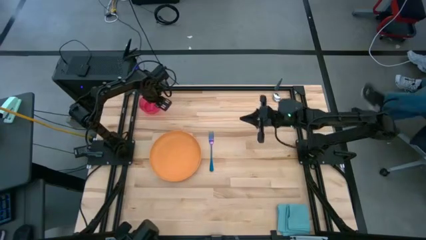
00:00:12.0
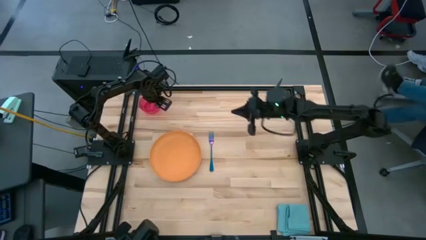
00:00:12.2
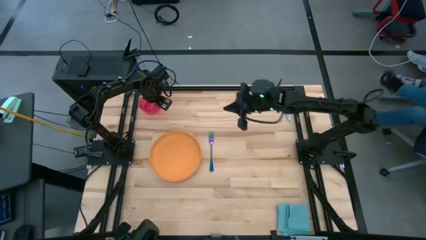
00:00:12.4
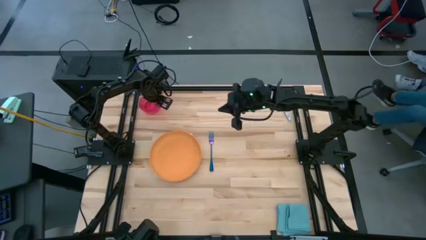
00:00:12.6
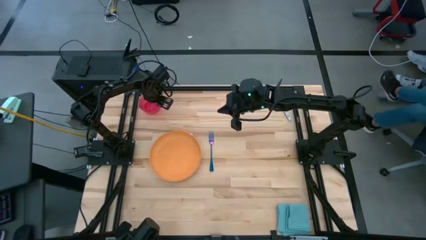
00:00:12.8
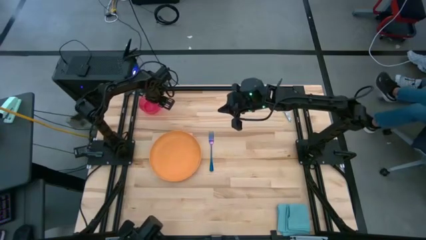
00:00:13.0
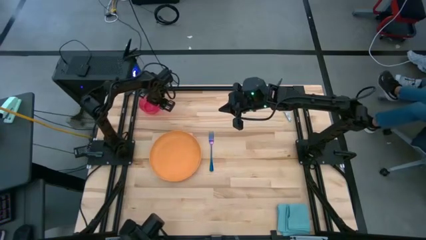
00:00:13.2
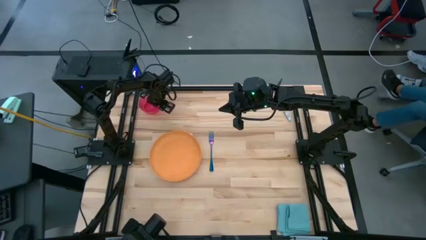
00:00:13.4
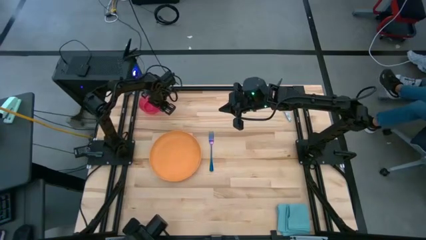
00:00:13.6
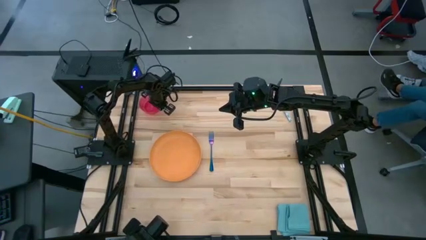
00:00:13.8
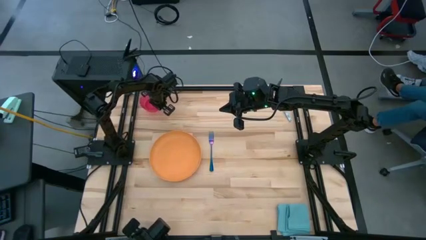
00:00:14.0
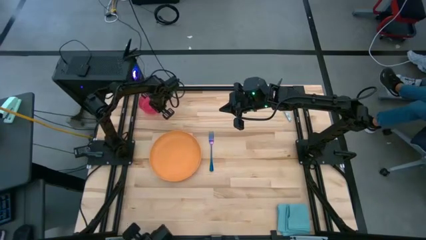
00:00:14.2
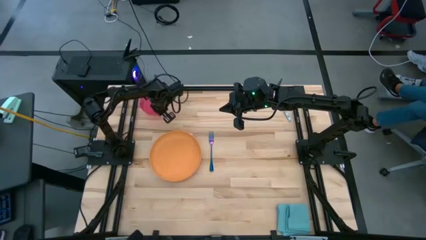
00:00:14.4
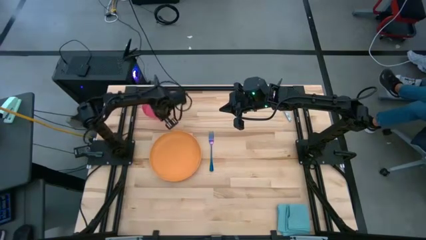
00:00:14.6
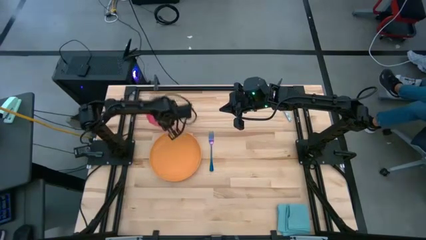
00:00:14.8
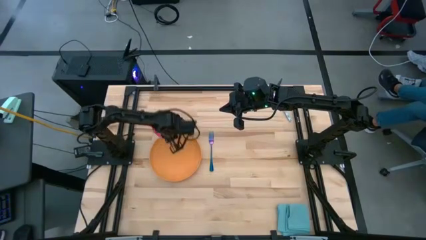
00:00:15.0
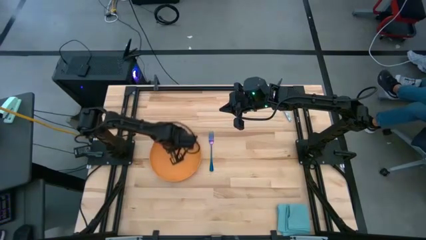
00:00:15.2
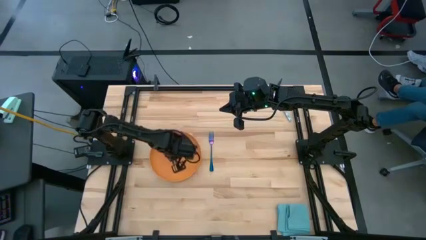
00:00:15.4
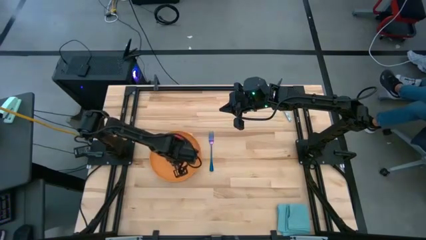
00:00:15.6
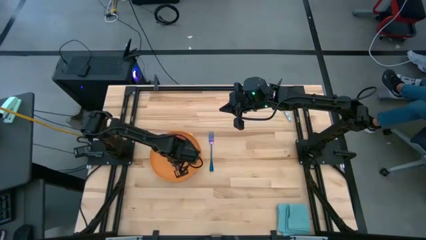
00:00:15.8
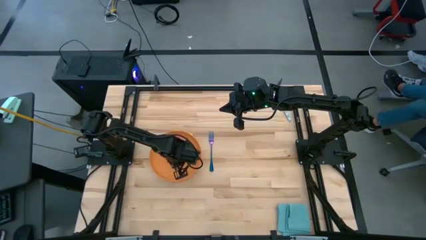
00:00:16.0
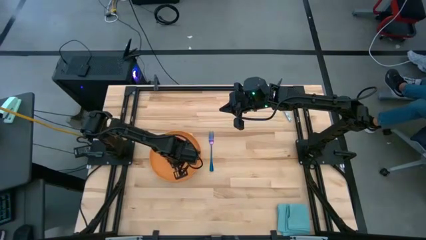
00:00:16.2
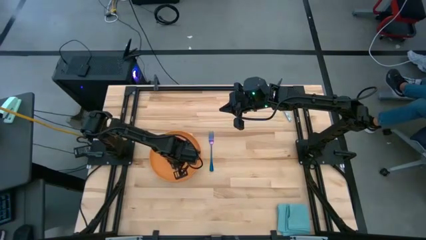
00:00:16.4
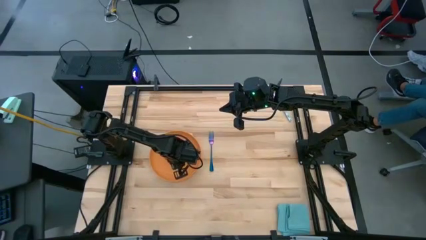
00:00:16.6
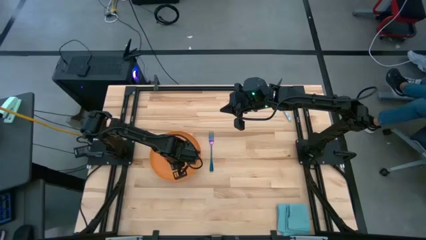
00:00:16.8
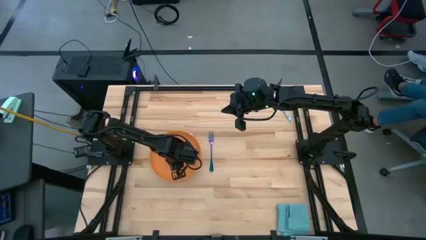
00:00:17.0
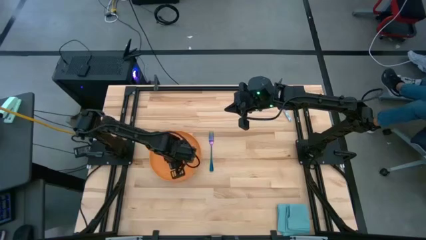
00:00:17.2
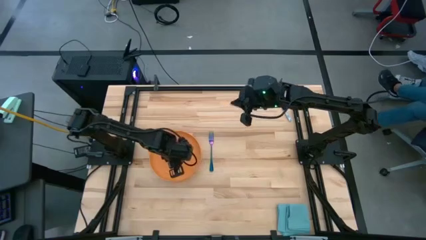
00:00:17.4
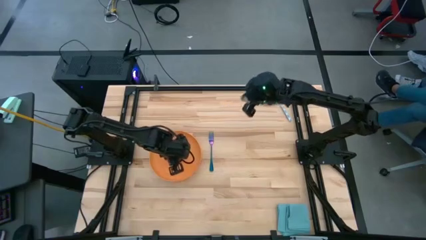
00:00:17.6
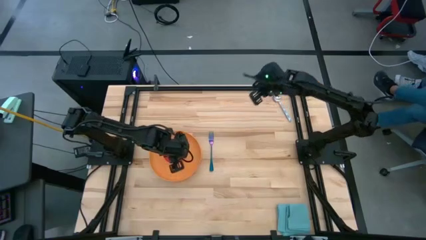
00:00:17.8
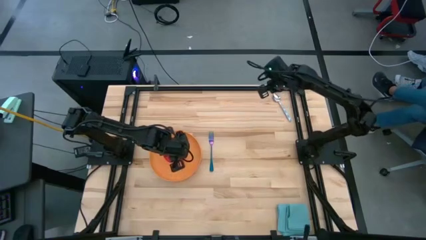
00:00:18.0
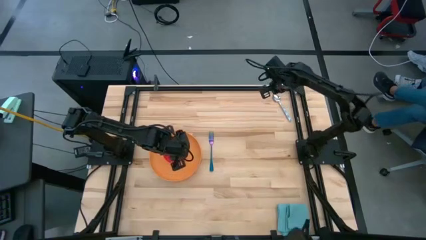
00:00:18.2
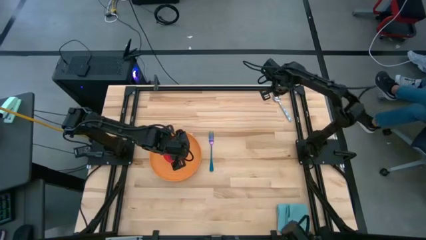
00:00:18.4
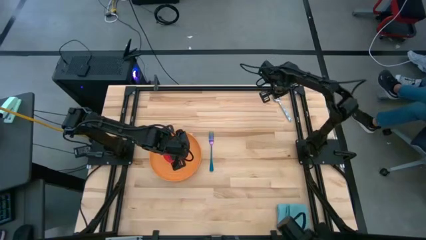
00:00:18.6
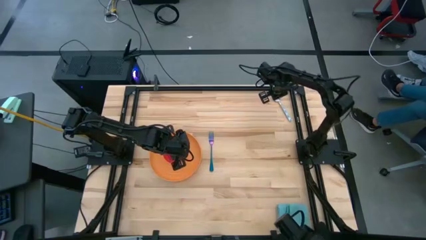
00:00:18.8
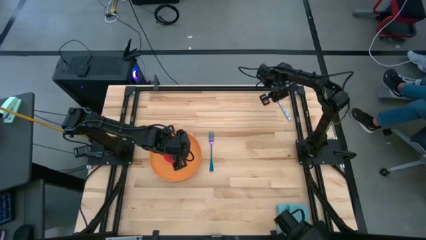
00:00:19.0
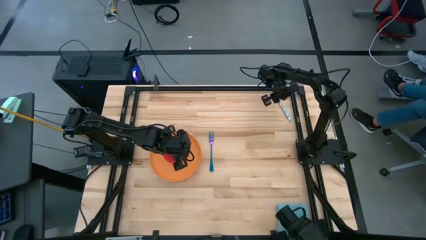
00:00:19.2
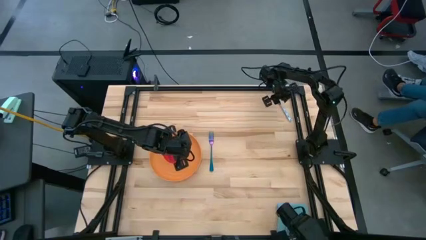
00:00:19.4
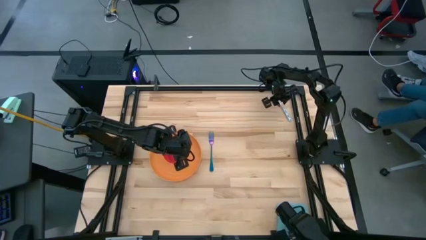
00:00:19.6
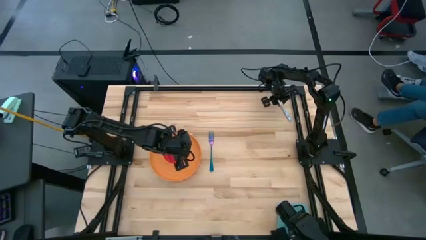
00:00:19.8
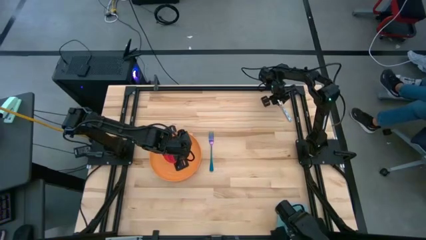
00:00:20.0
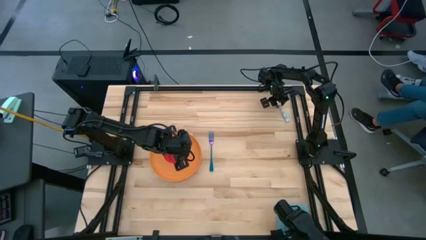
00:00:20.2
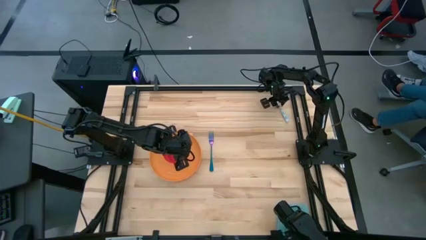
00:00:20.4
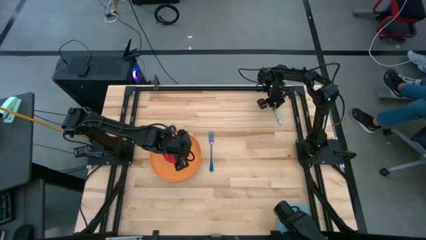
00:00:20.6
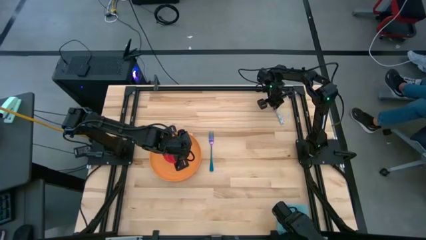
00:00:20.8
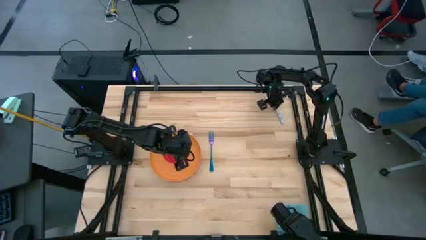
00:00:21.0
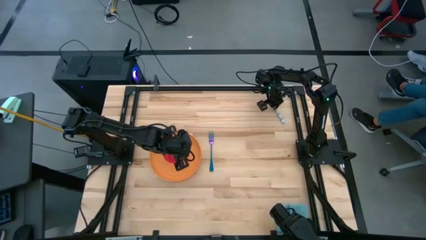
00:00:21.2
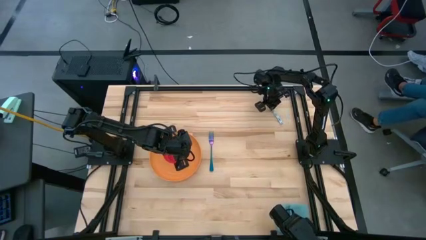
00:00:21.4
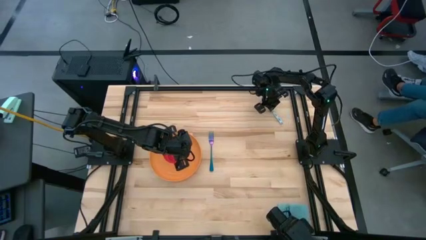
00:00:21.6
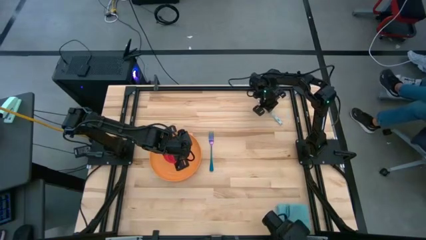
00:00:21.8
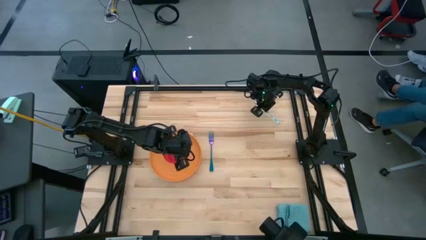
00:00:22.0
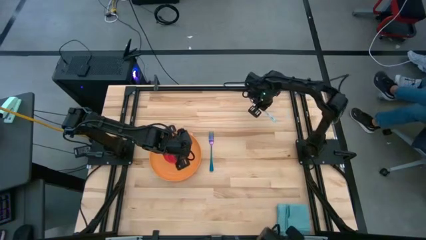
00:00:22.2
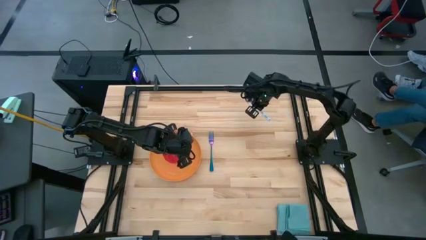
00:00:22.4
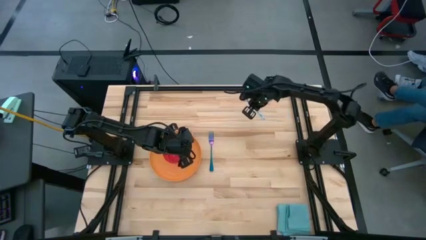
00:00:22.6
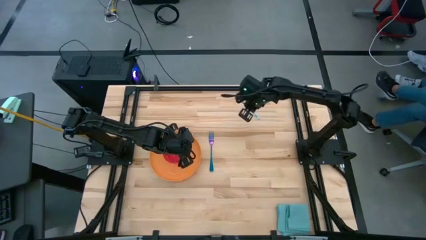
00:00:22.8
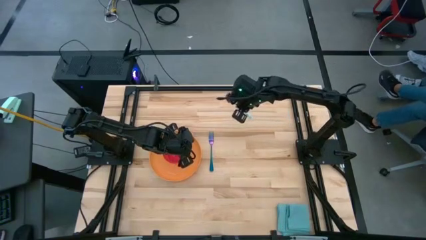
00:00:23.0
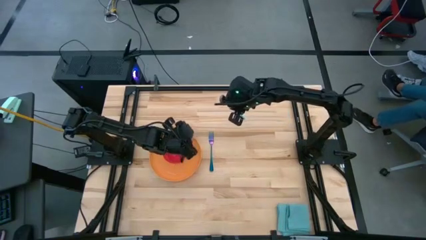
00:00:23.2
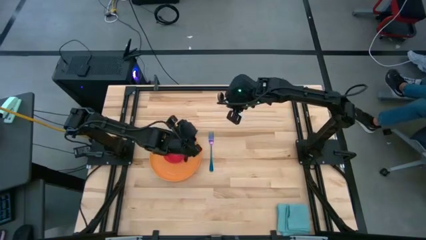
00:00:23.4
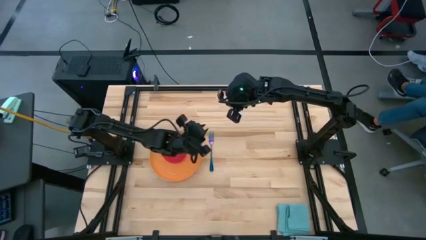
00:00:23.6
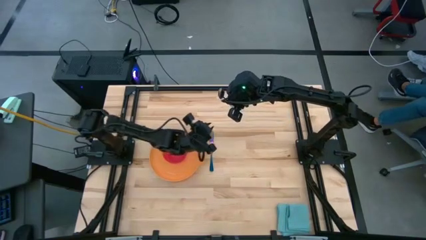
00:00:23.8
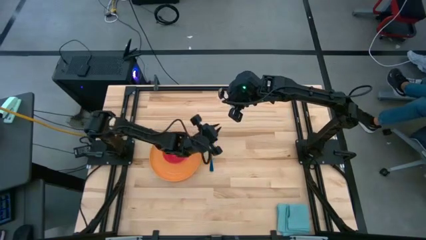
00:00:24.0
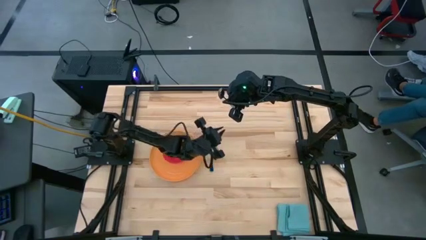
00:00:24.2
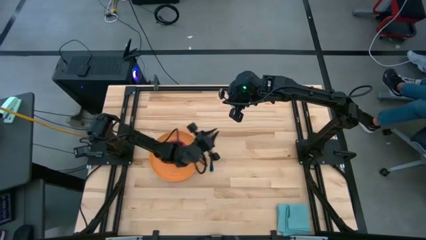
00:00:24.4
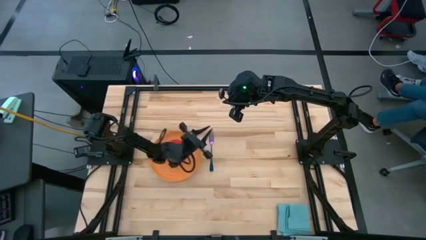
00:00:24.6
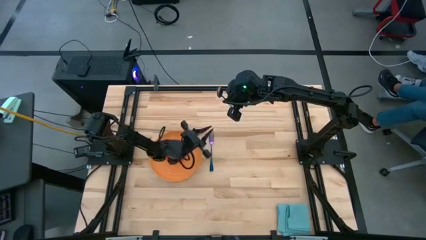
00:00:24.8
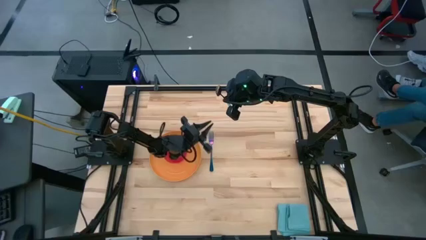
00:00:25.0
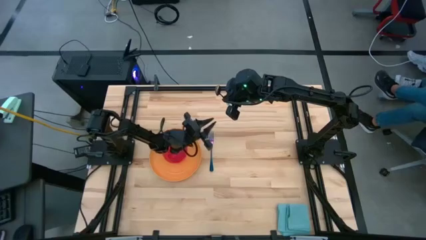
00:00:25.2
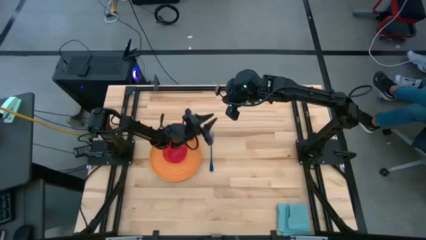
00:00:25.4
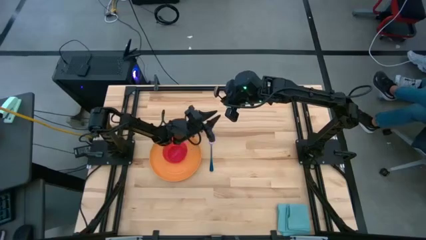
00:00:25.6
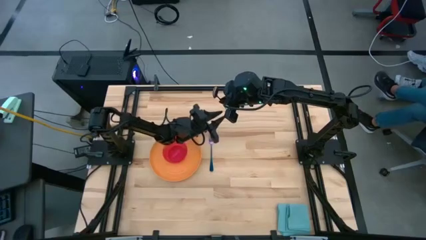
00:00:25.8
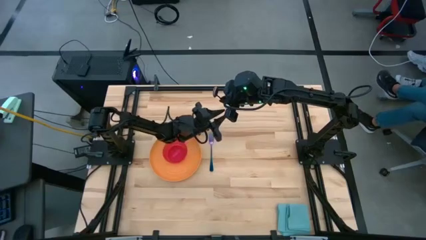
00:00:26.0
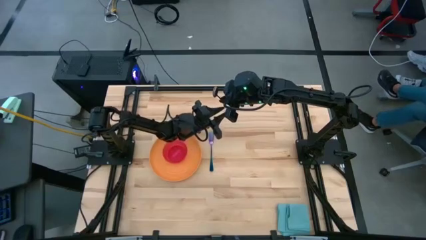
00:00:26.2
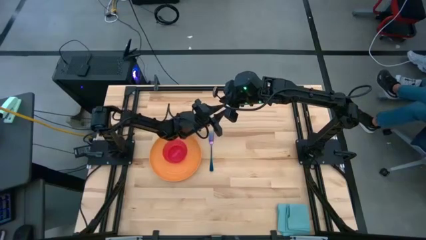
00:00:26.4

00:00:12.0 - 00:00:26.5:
Task: Set table place
Place the metal spoon into the pink bowl

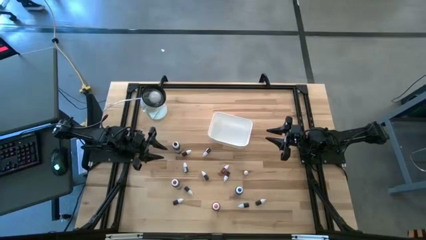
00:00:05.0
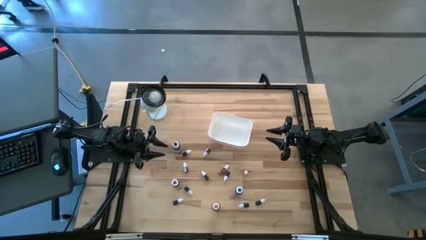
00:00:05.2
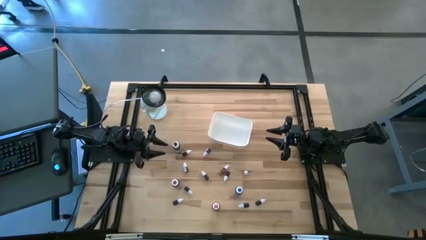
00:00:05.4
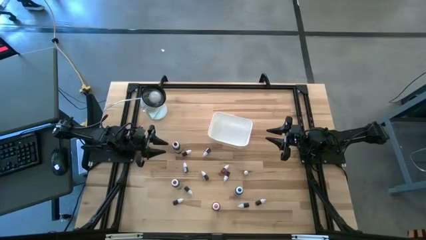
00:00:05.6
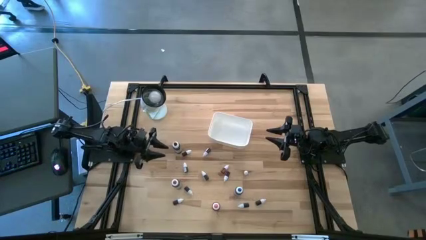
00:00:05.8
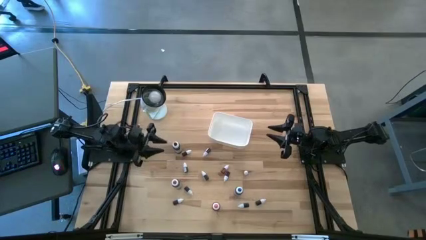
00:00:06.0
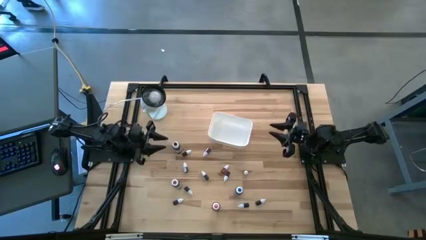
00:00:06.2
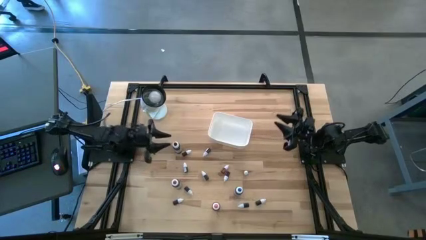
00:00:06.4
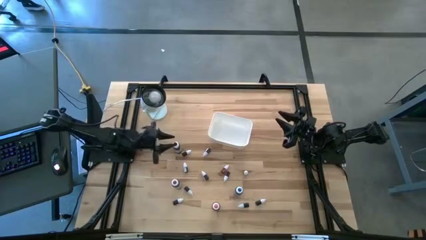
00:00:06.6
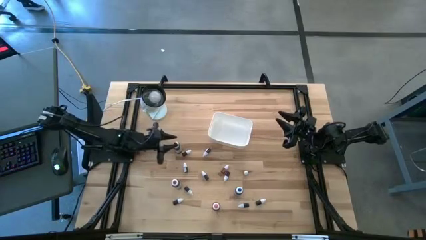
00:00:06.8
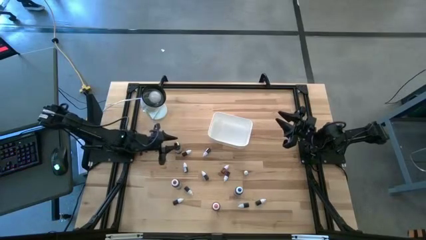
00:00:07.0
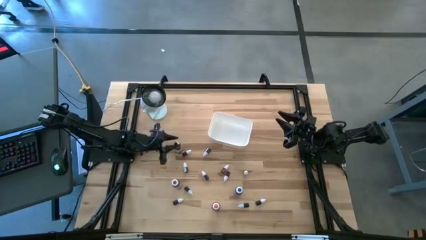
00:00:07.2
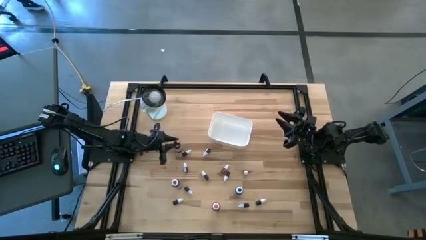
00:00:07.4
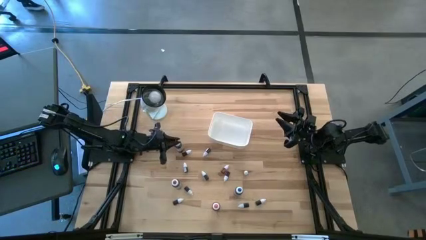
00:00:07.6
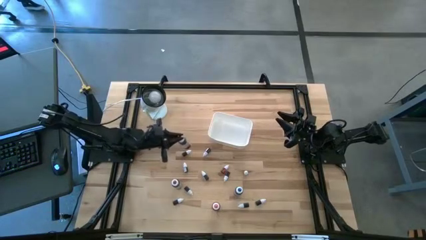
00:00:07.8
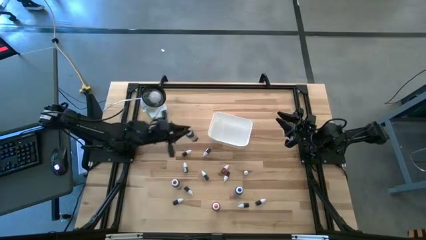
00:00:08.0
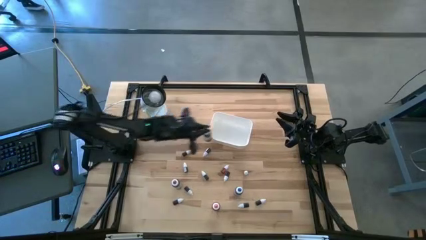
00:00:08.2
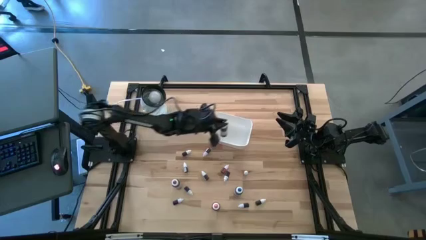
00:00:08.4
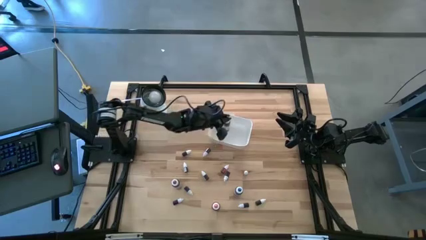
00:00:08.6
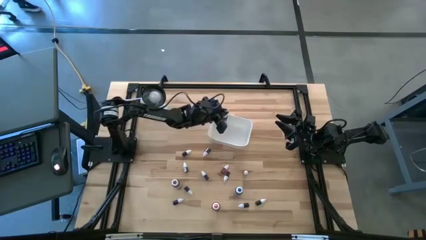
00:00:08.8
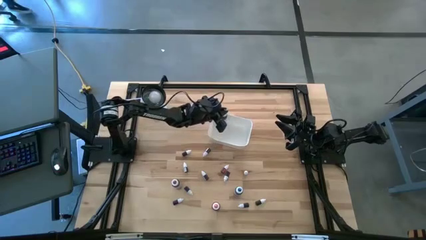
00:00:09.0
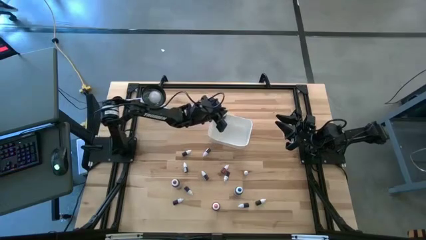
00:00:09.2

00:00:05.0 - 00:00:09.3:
Task: Pick & Place food coloring
Put the big black food coloring bottle into the white bin
